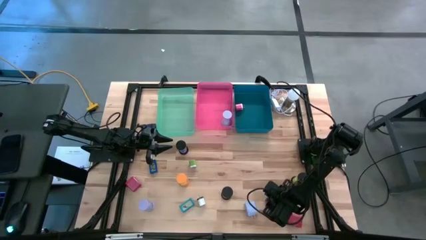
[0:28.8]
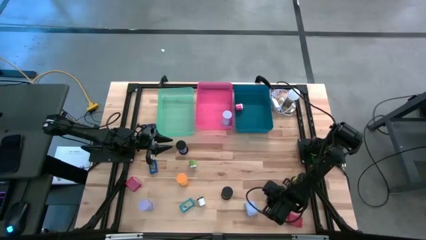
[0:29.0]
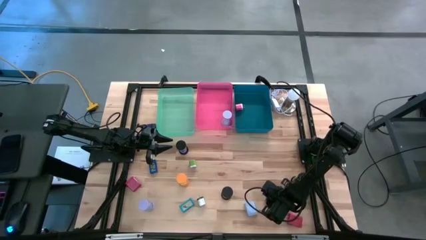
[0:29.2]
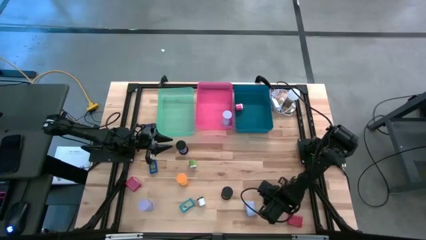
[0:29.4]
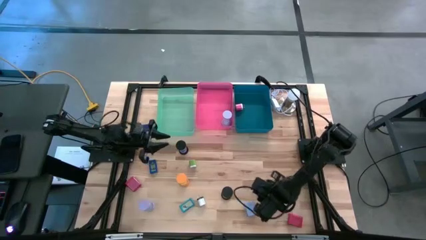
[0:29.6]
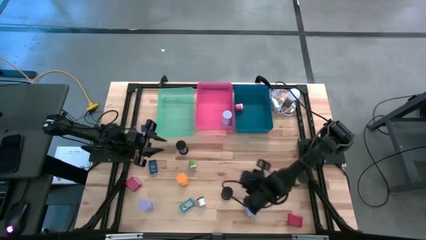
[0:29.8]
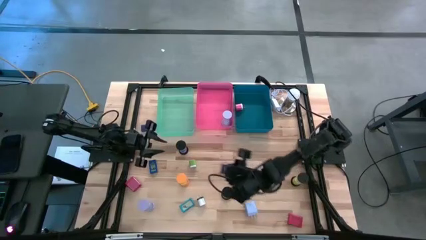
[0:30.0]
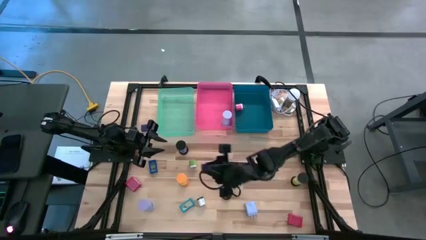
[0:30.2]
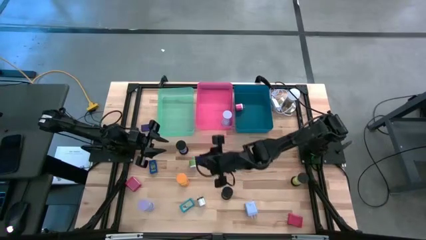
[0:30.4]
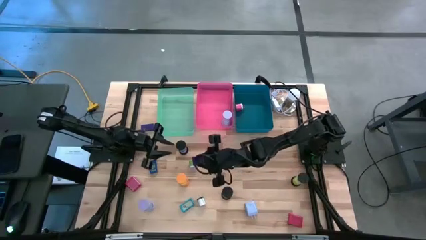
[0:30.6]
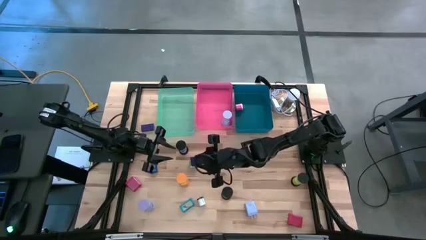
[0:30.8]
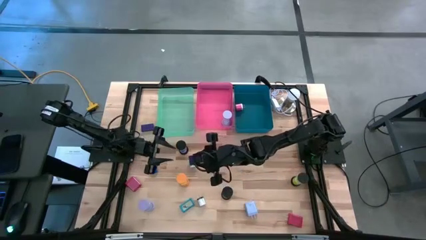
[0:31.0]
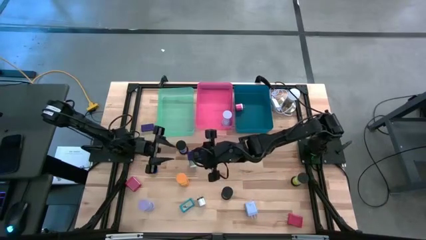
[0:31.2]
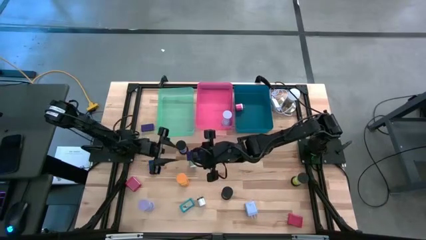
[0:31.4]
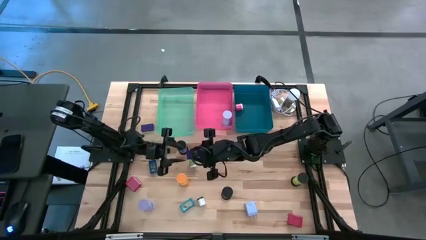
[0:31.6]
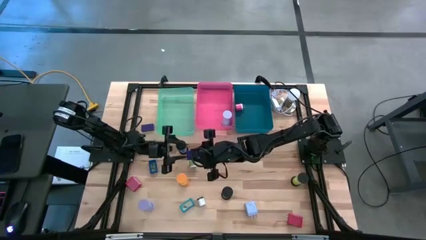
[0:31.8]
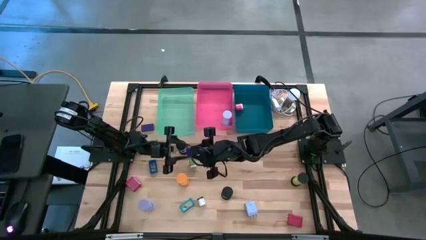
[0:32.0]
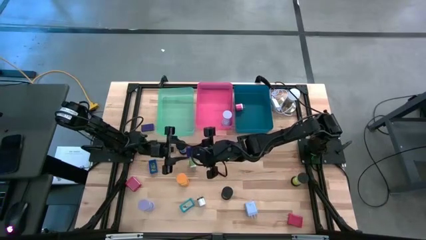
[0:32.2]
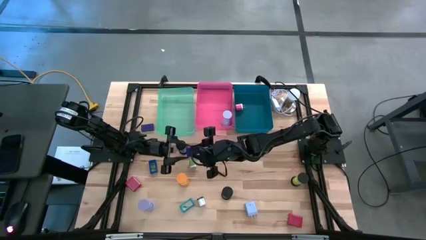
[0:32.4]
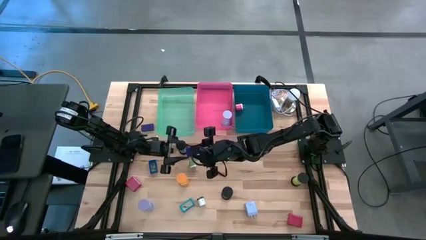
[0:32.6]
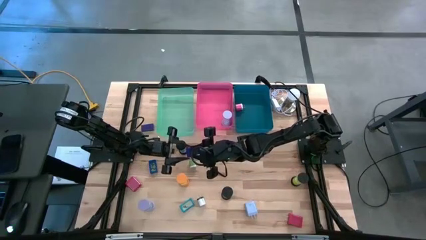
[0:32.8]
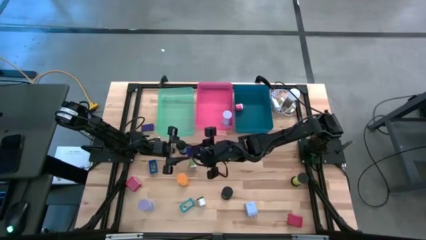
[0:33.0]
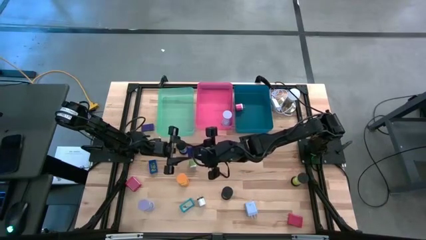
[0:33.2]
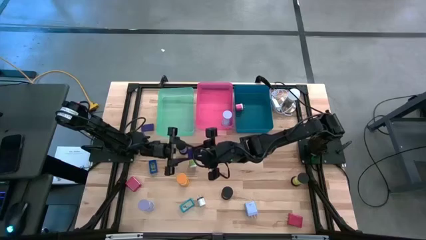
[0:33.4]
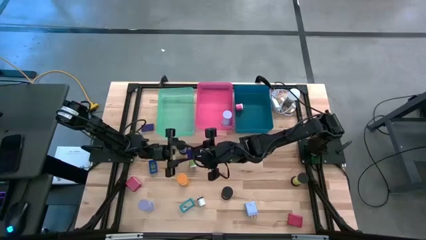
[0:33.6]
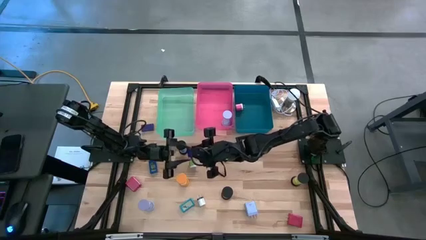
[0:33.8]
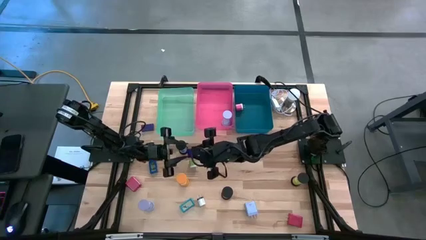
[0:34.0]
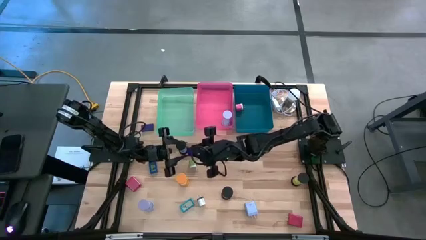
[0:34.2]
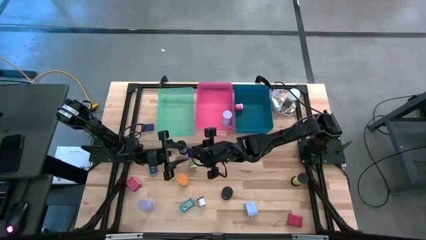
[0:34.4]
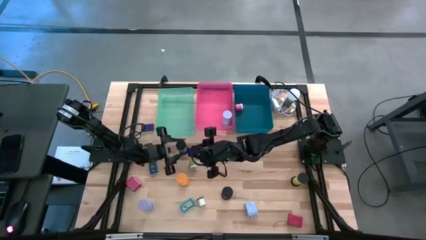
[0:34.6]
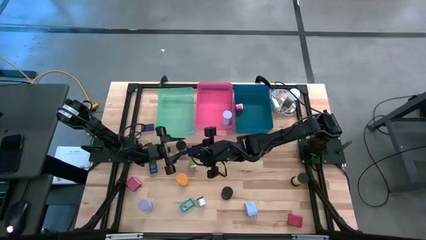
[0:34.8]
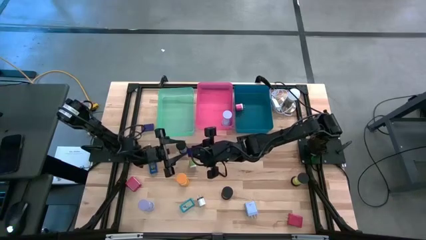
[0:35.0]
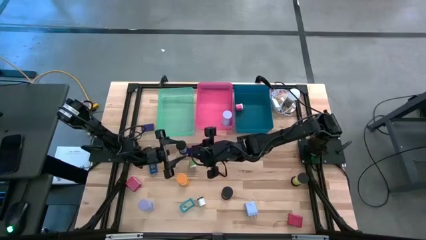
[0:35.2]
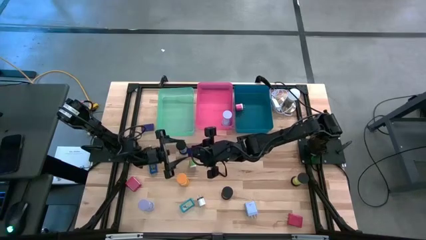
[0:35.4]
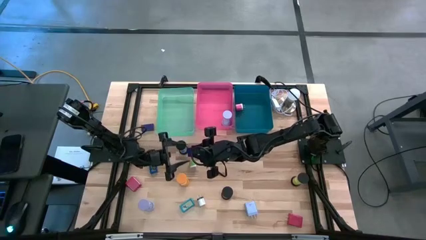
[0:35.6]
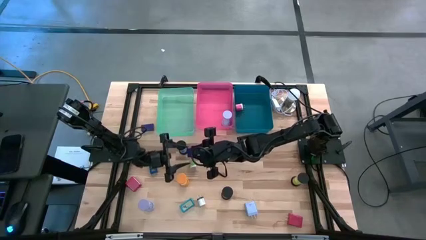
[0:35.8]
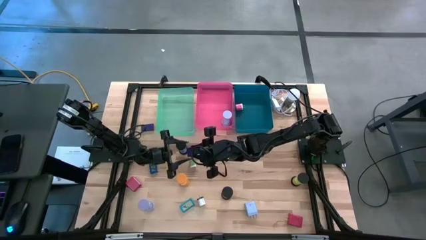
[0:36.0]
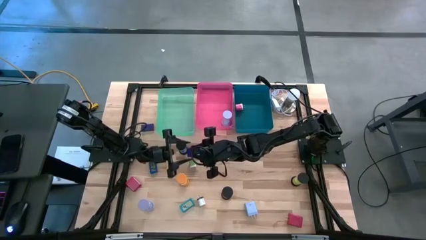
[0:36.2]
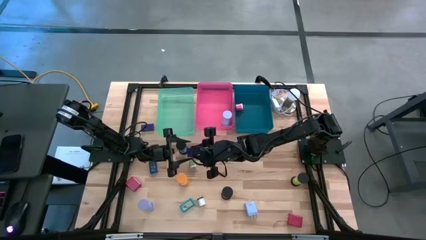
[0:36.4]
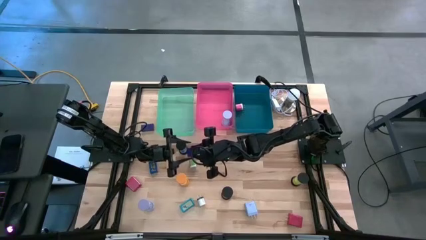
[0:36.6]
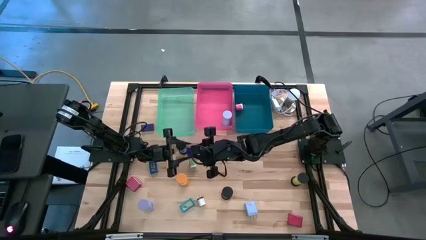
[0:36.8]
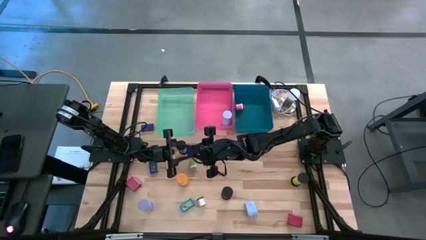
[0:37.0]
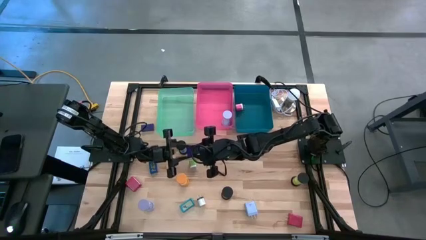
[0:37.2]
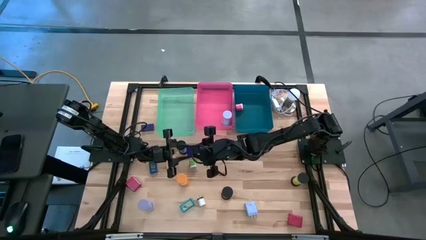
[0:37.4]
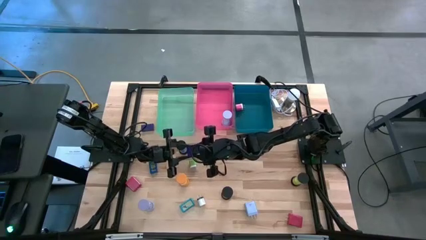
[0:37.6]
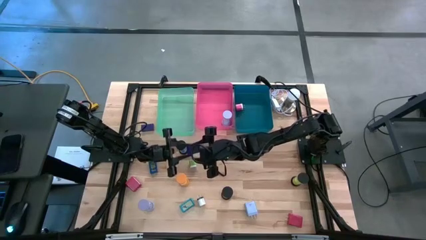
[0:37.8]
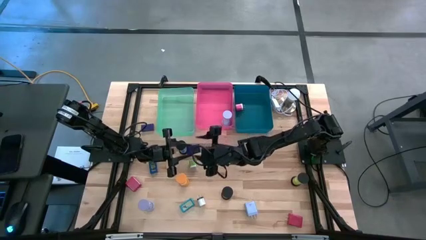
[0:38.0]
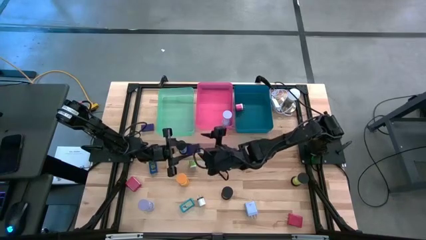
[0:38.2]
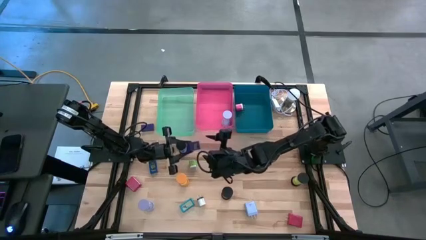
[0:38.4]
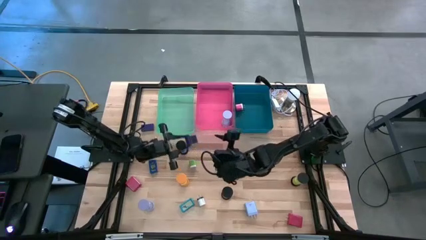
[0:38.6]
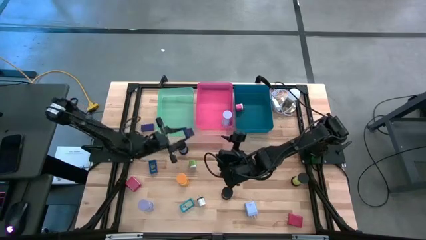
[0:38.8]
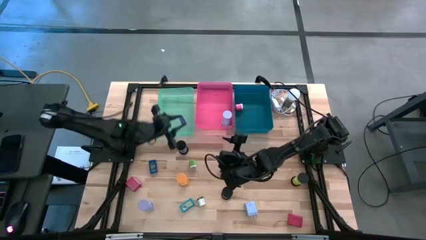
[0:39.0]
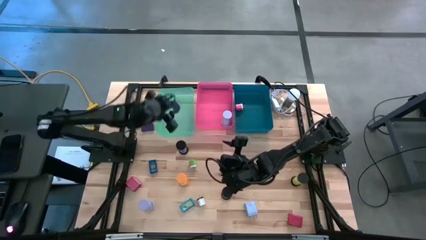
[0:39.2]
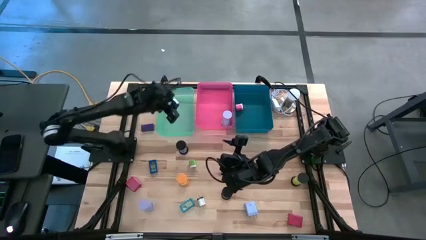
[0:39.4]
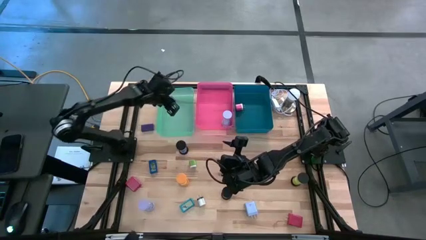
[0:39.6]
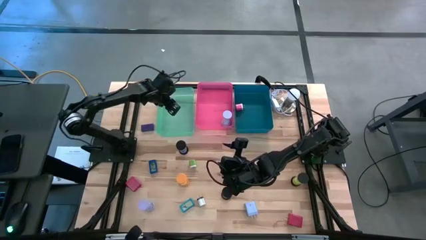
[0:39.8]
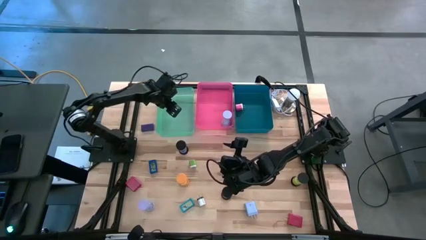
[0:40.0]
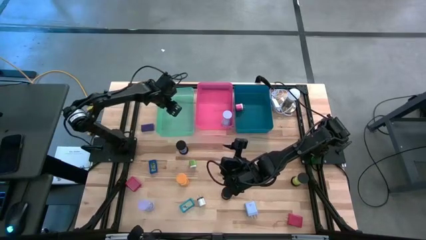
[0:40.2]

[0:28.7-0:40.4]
Task: Pick & Place Office items
Put the right purple digital clock into the green bin
